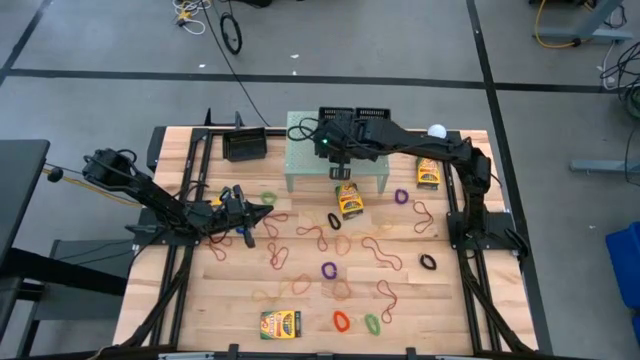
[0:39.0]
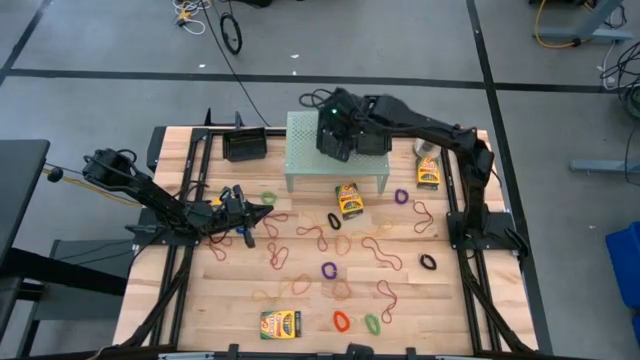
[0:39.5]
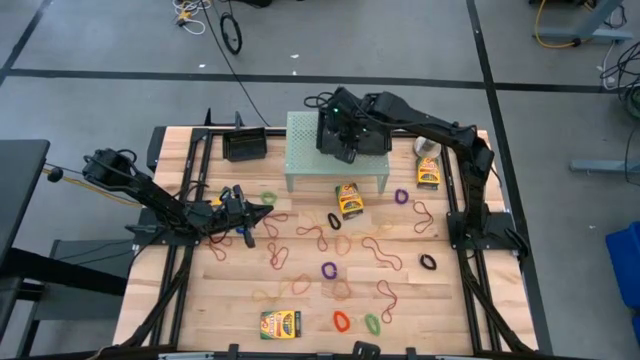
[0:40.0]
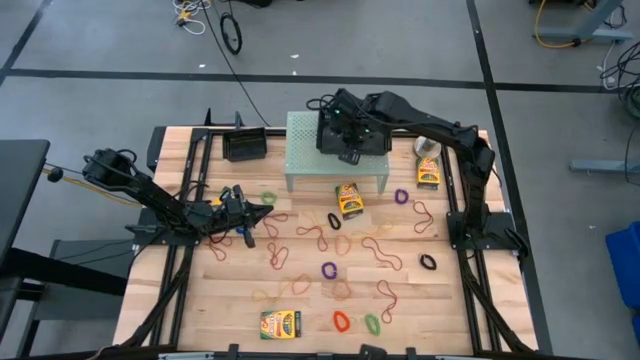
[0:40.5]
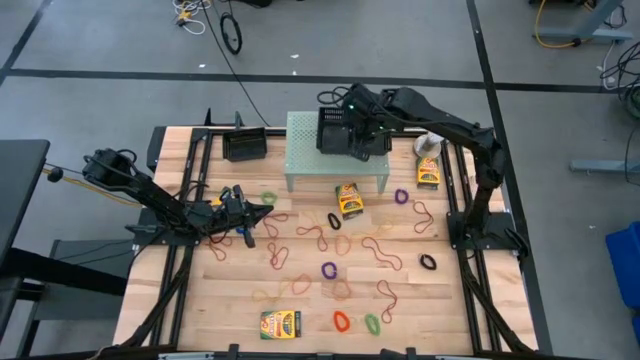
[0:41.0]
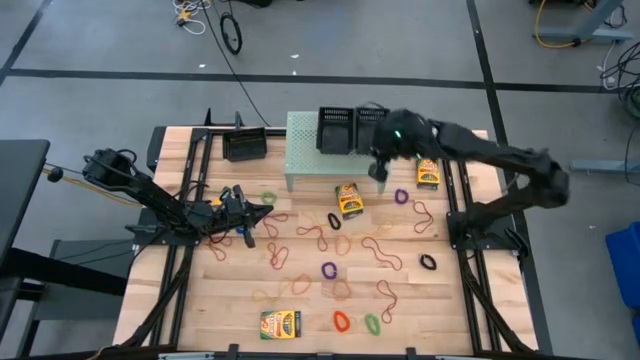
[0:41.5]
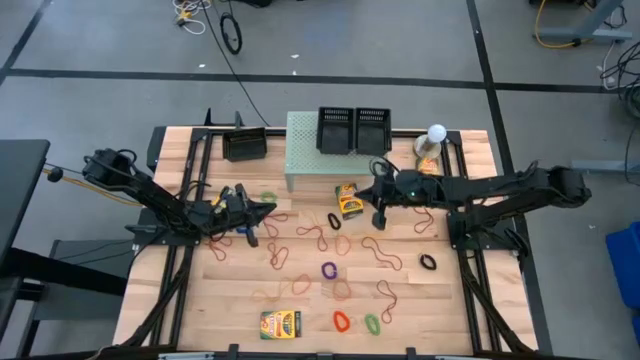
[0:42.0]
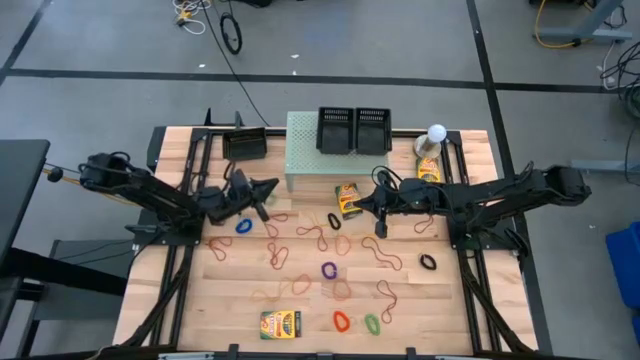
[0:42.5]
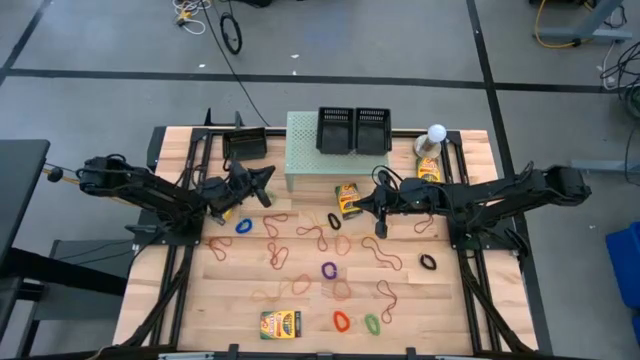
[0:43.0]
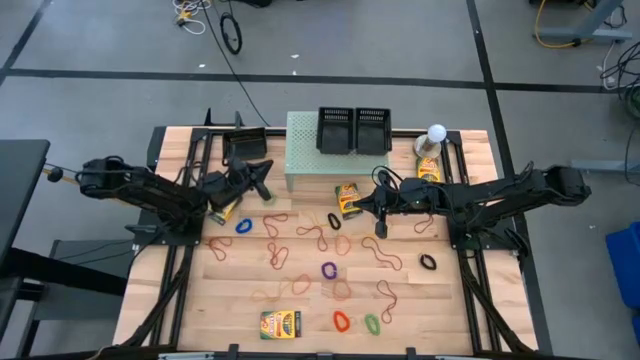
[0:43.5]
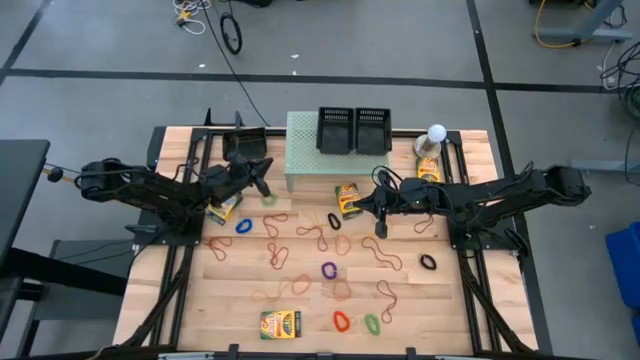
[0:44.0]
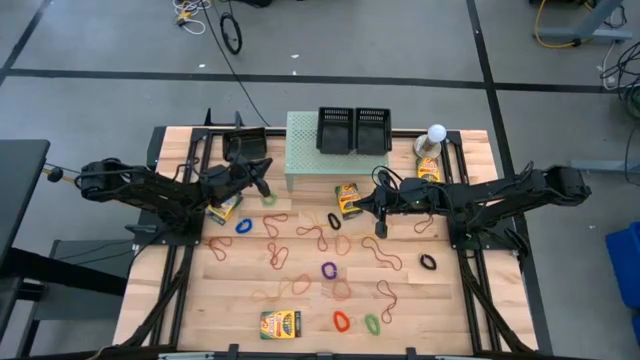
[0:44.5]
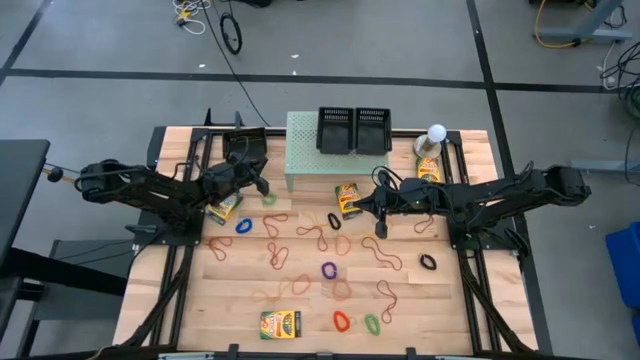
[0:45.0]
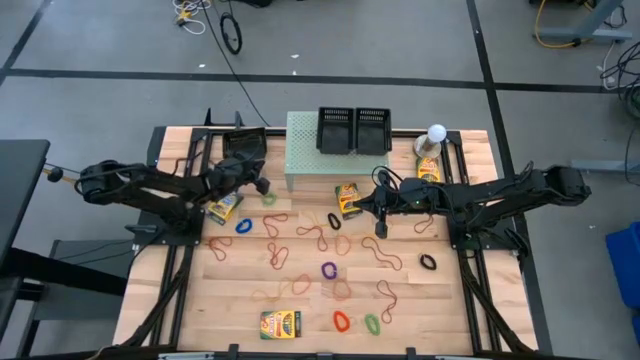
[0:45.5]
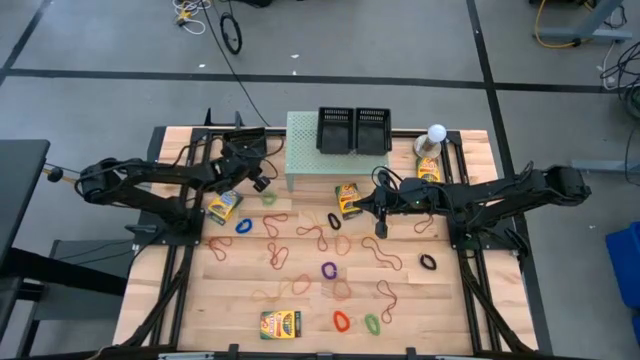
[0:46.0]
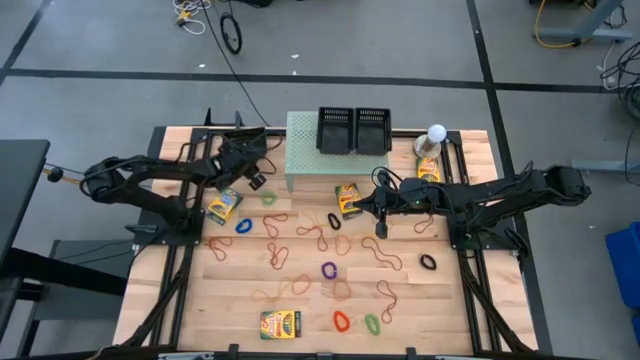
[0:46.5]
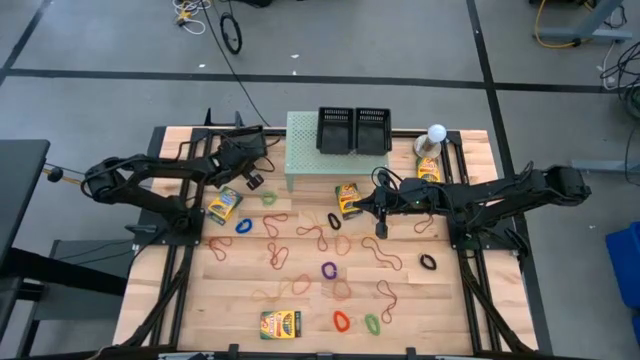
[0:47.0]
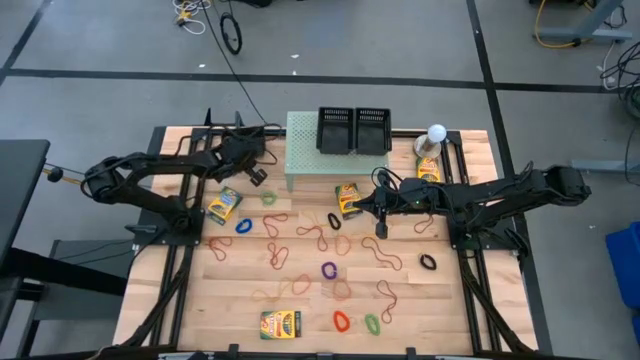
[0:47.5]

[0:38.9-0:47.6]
Task: Pick & Place Office Desk Supplies
Put the black bin on the shelf

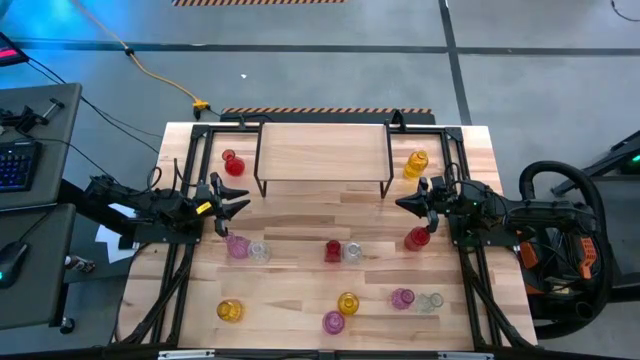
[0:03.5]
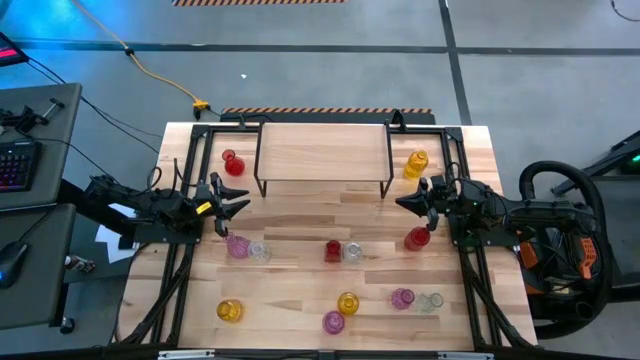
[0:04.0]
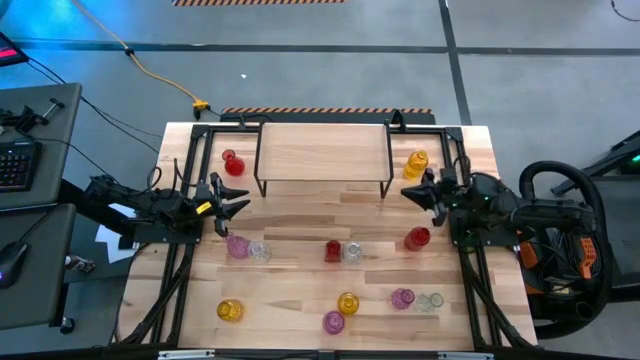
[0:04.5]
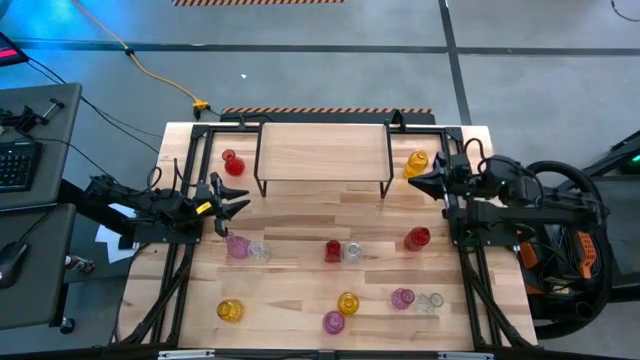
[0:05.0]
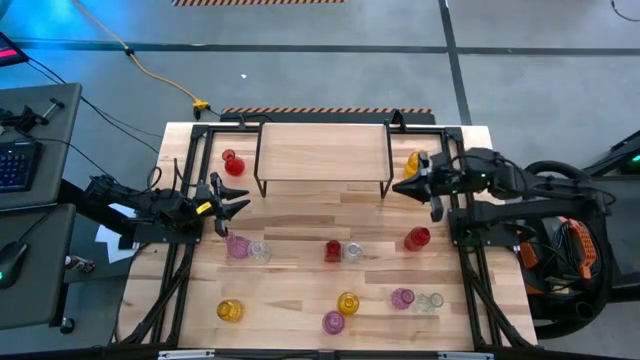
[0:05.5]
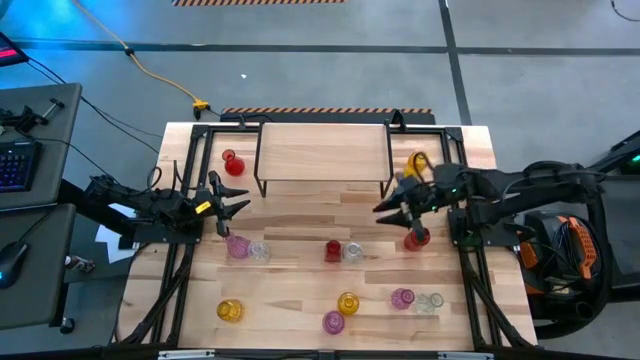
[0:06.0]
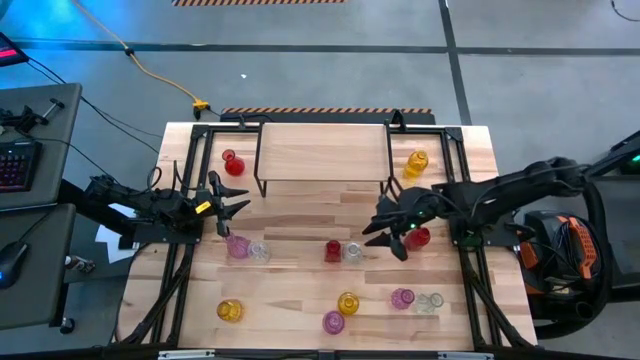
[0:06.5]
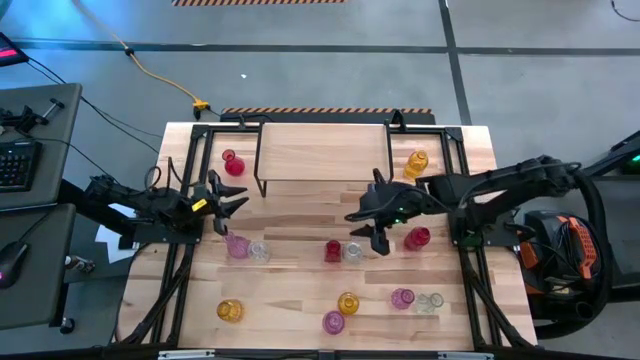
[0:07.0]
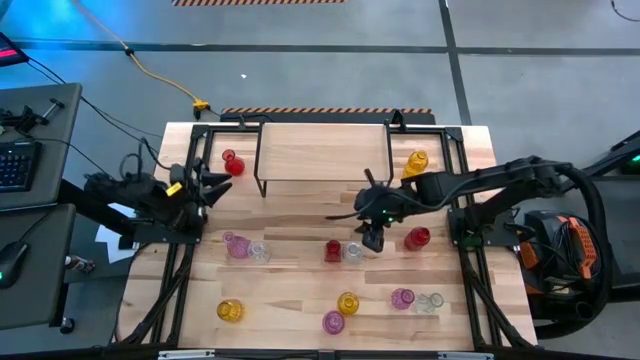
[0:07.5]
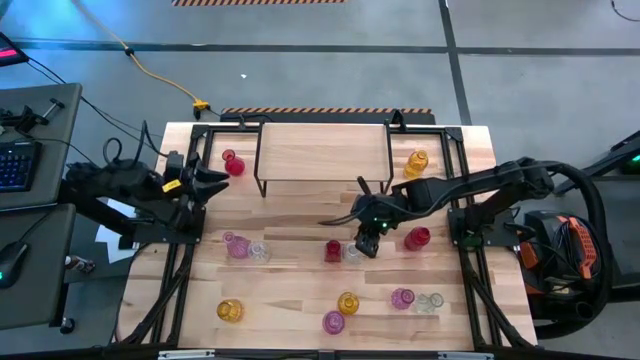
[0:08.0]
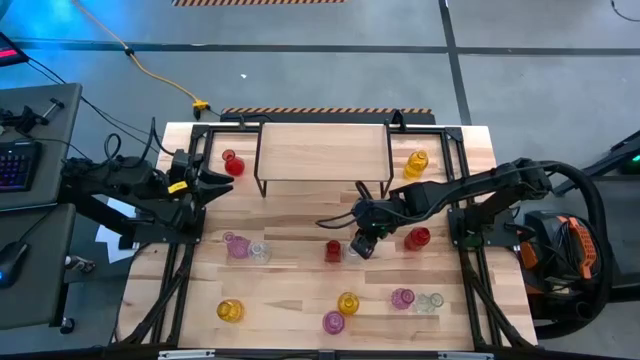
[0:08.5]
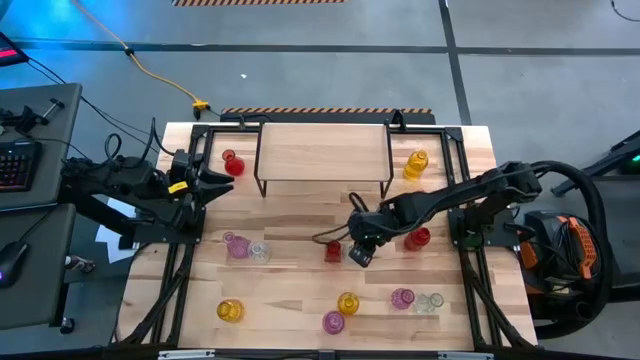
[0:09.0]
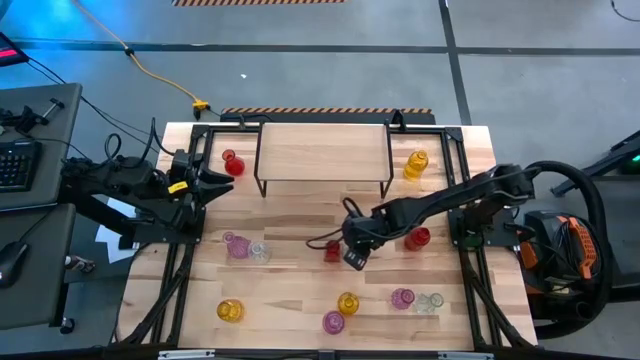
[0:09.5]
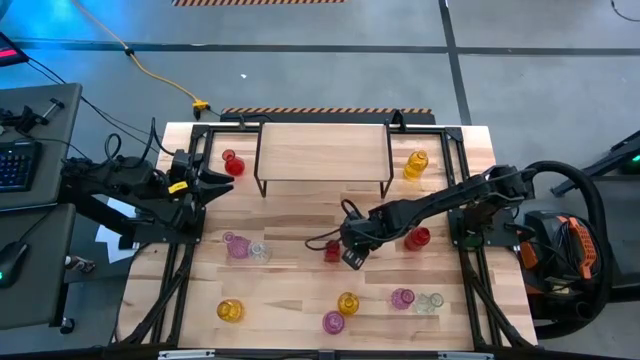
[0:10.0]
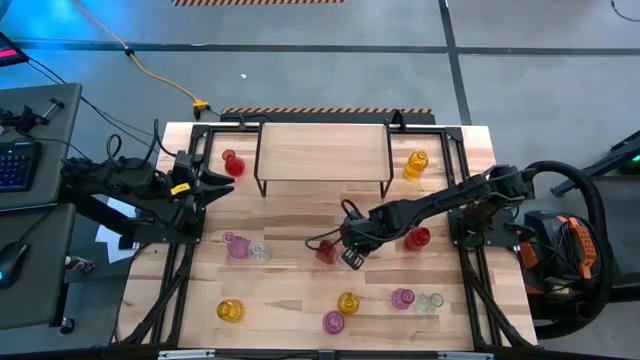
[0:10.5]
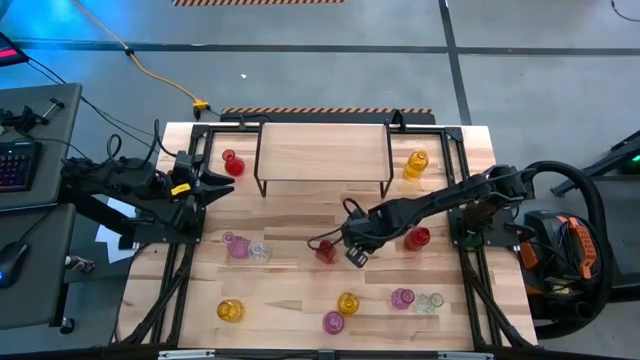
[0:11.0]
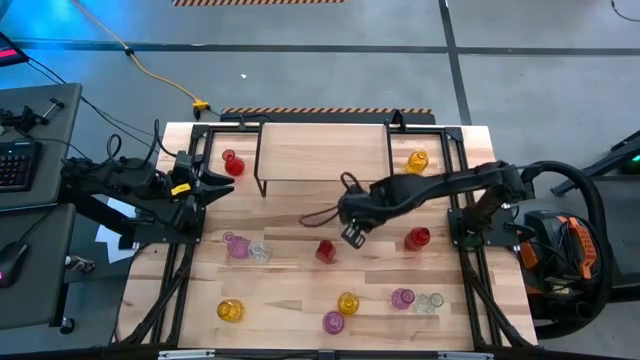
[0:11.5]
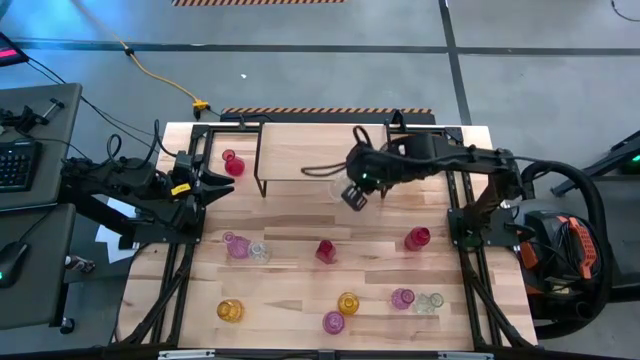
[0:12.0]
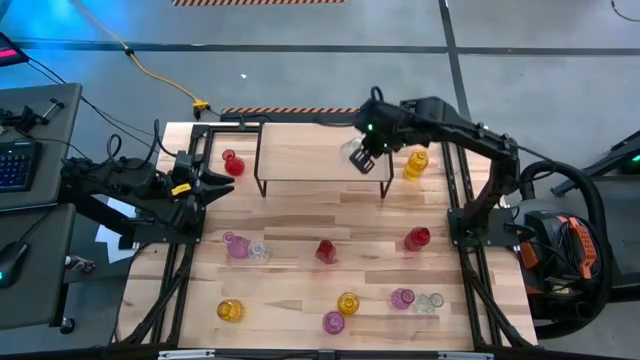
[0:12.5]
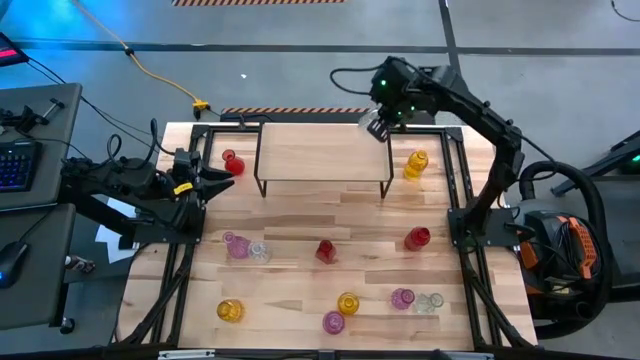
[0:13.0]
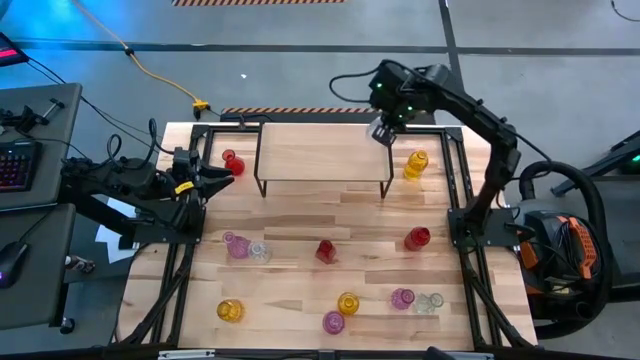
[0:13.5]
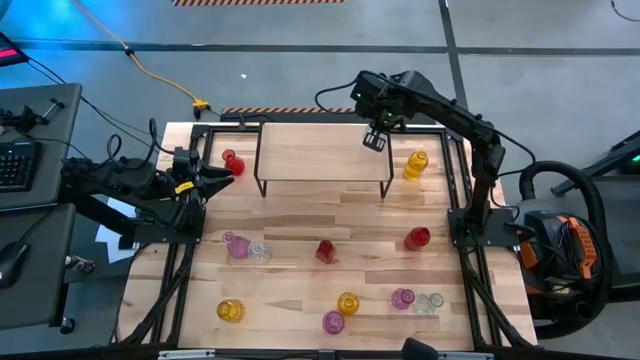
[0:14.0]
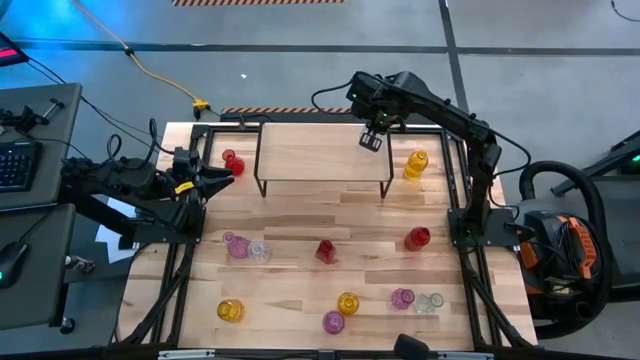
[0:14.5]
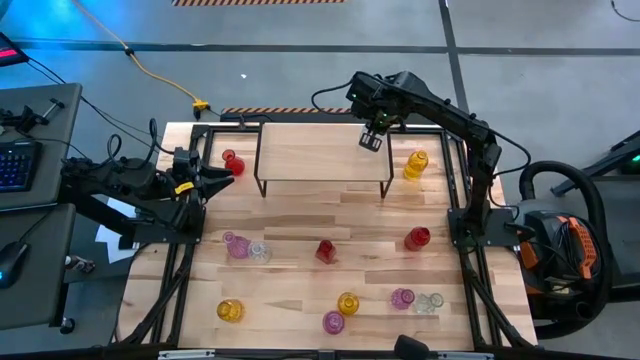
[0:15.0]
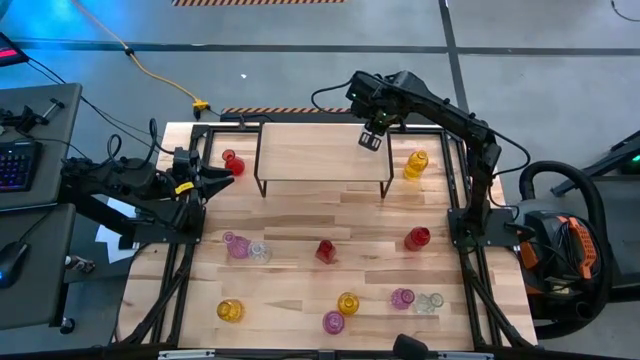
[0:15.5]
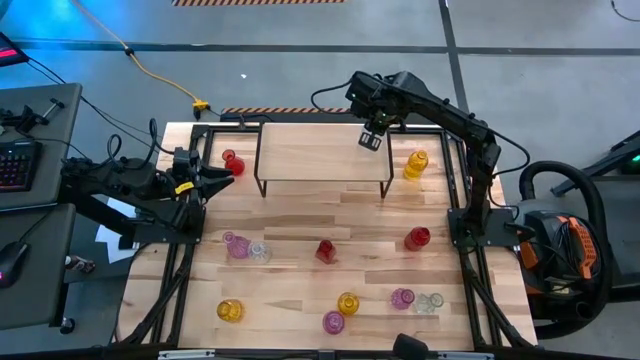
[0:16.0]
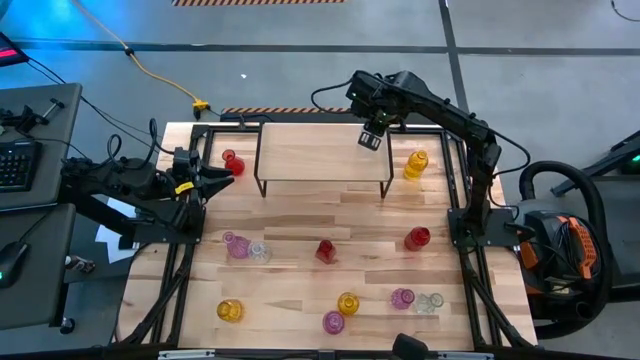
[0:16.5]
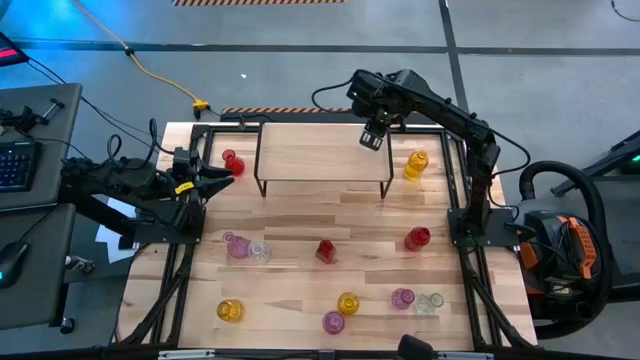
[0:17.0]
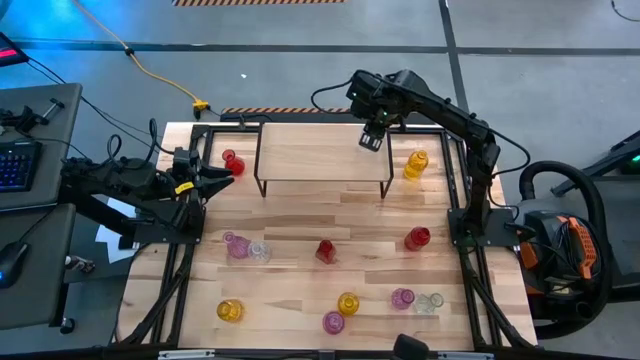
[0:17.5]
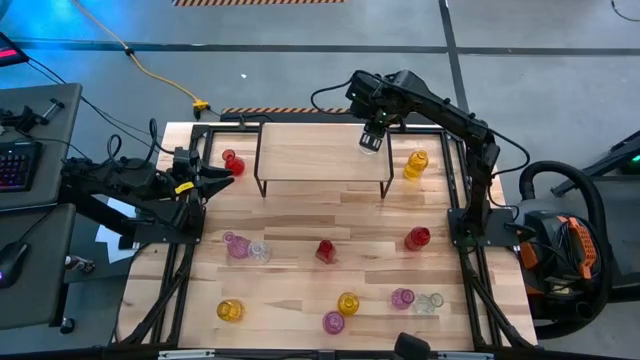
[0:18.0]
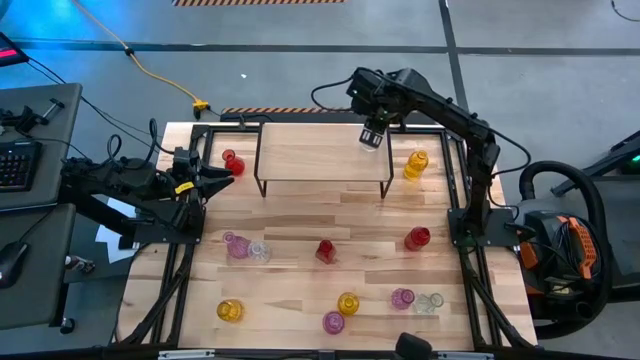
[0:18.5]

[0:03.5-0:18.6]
Task: sort vases onto shelf
Put the center transparent vase on the shelf
